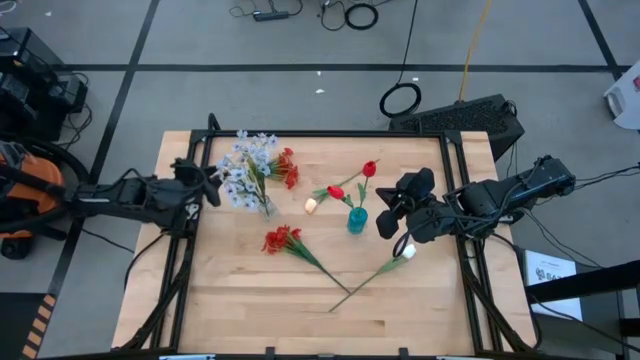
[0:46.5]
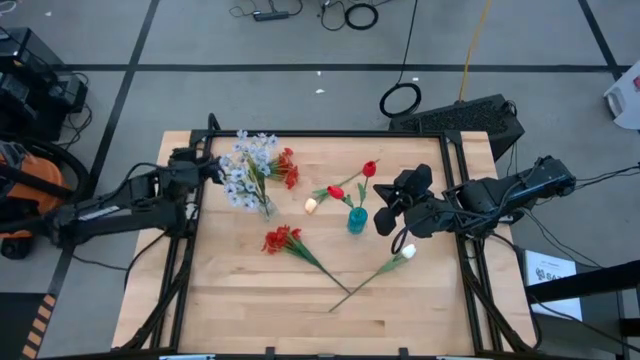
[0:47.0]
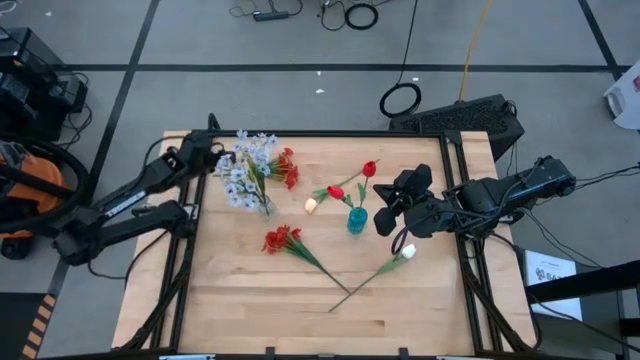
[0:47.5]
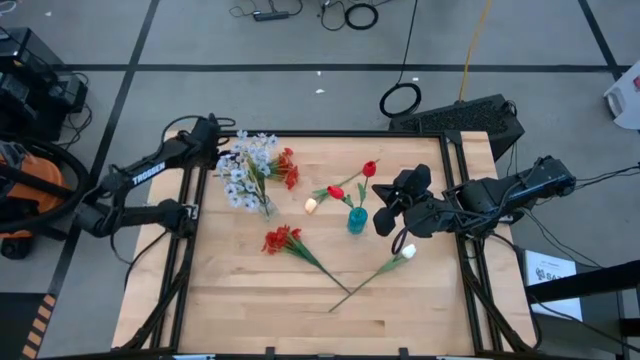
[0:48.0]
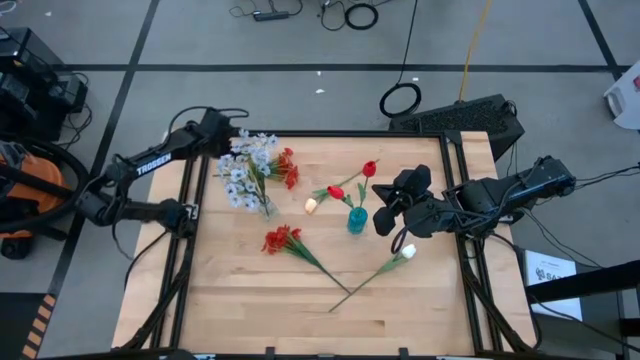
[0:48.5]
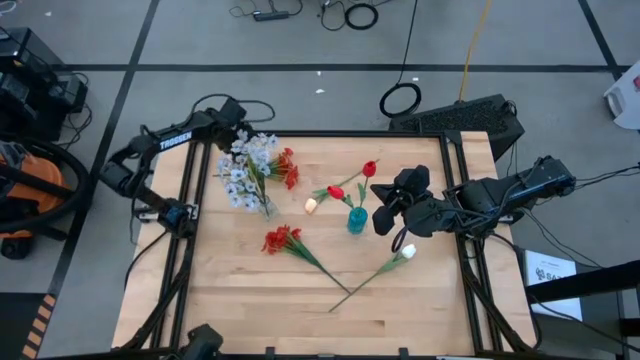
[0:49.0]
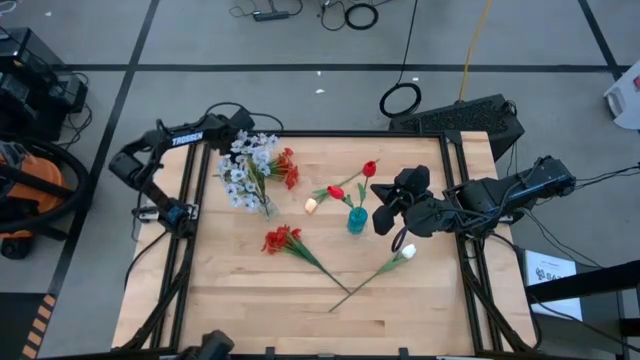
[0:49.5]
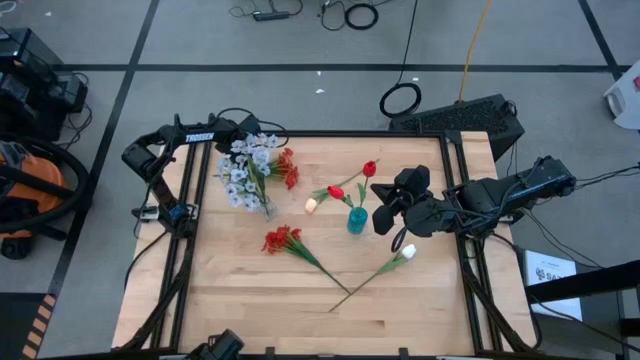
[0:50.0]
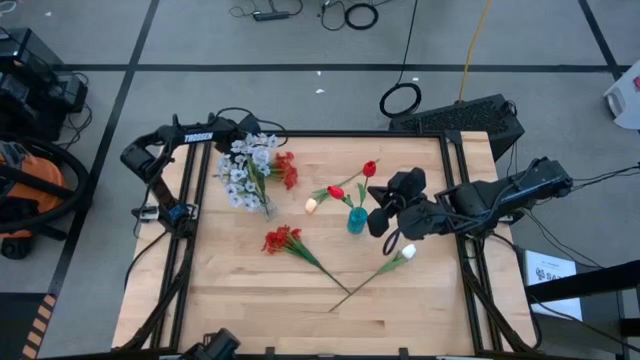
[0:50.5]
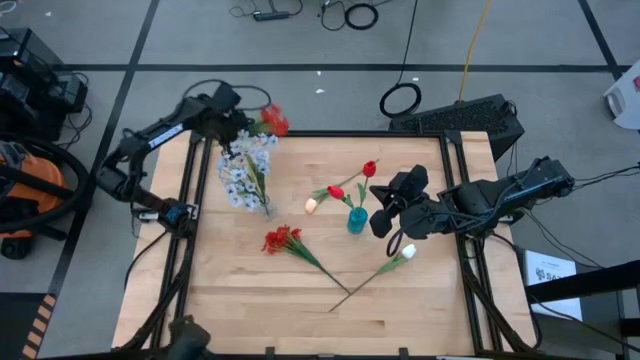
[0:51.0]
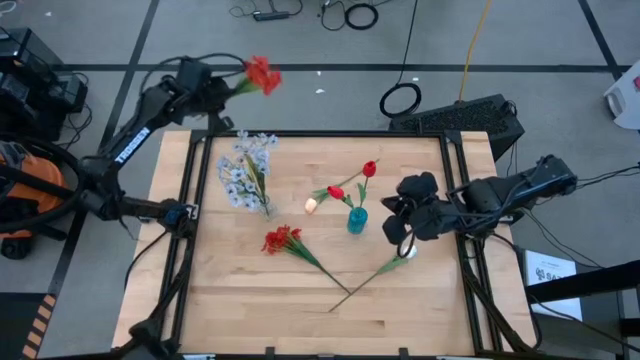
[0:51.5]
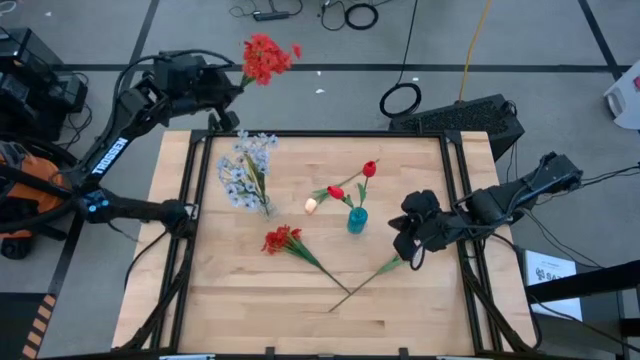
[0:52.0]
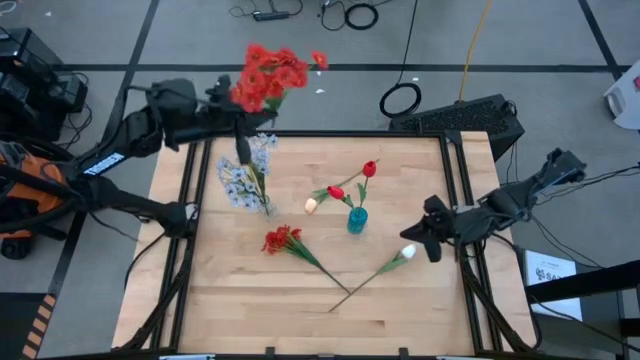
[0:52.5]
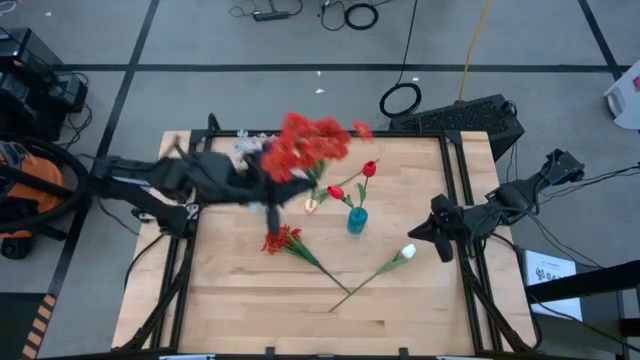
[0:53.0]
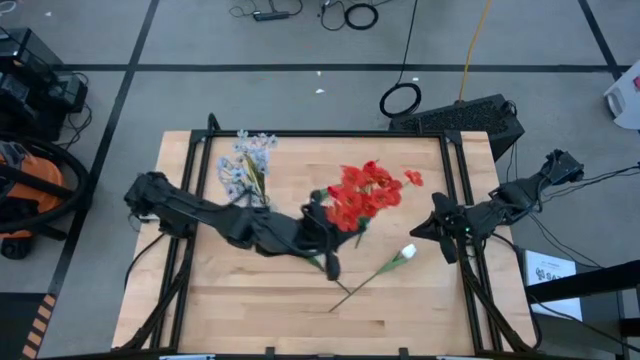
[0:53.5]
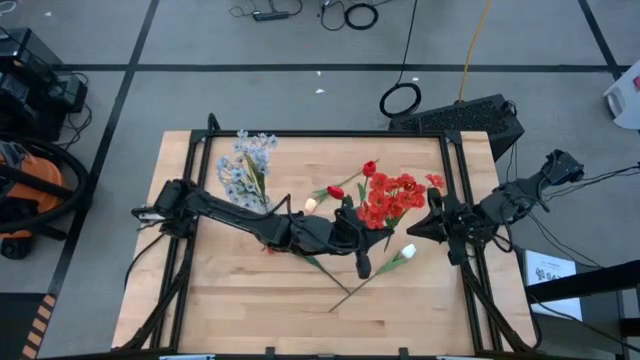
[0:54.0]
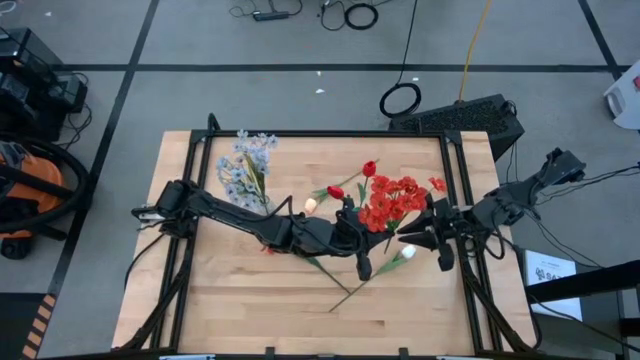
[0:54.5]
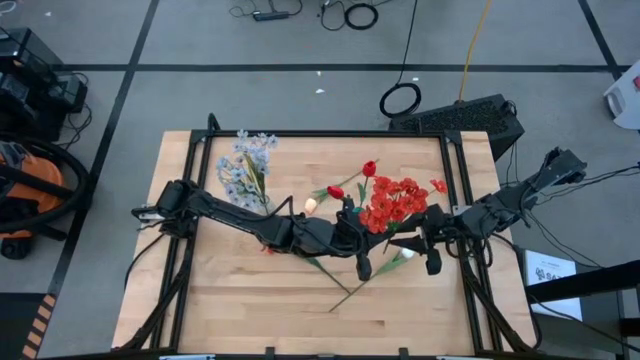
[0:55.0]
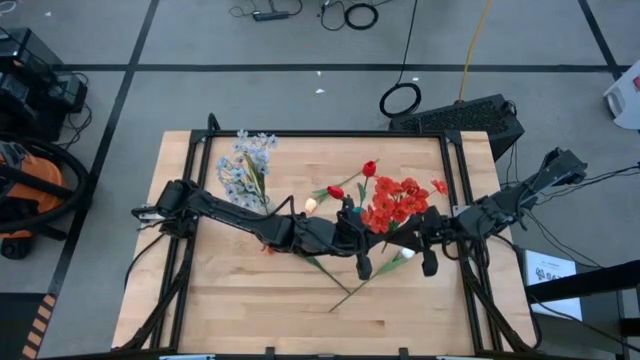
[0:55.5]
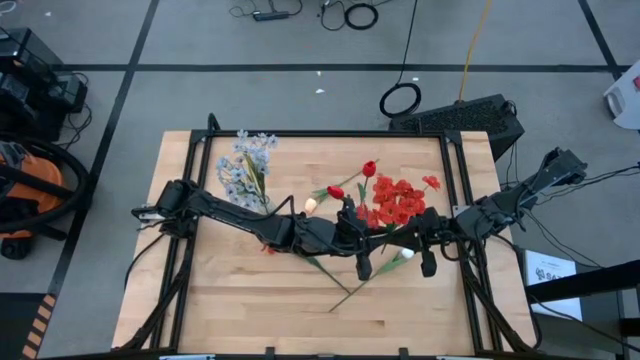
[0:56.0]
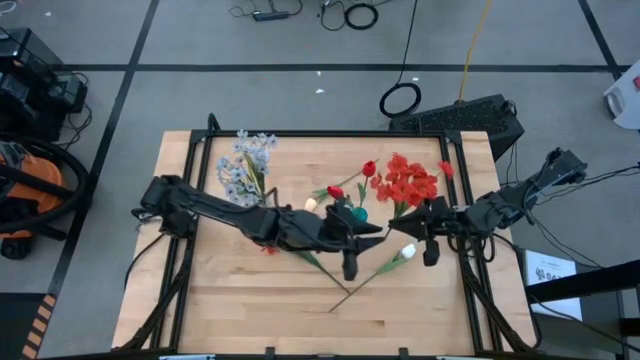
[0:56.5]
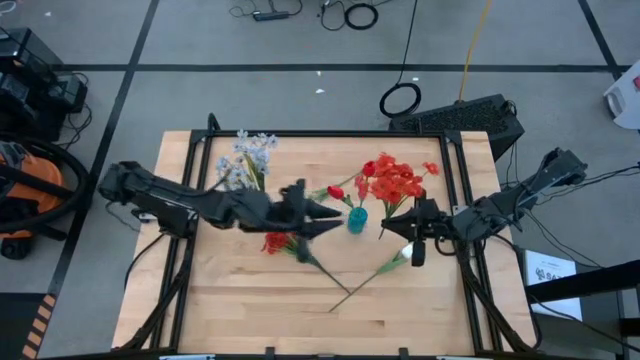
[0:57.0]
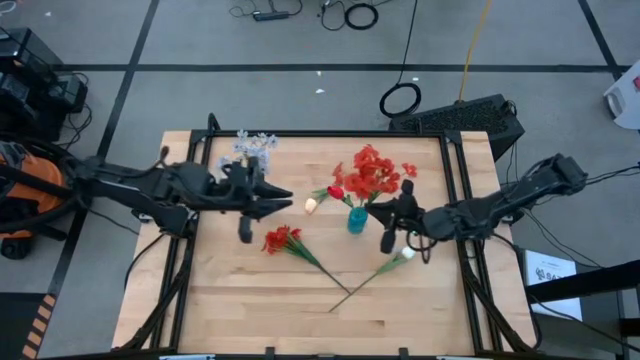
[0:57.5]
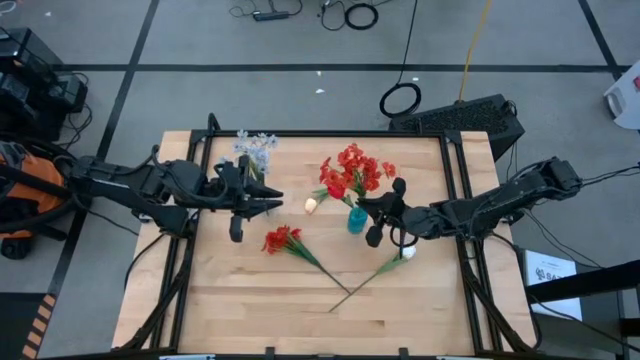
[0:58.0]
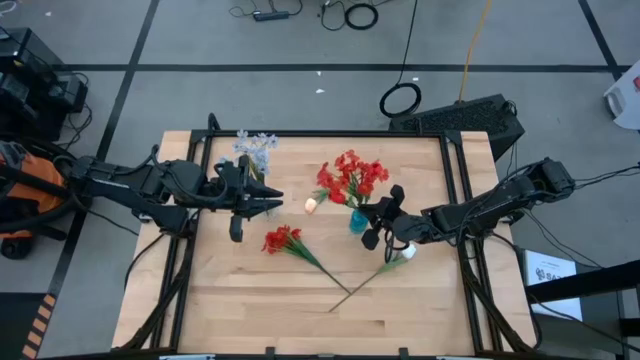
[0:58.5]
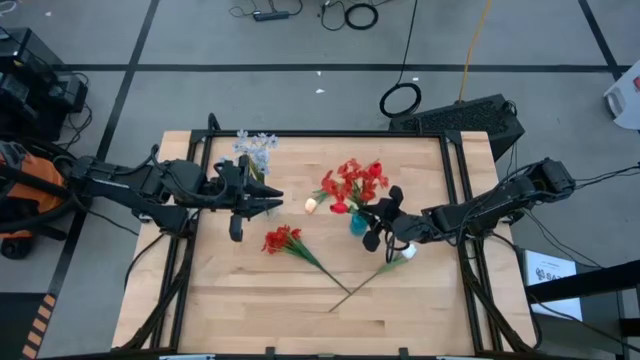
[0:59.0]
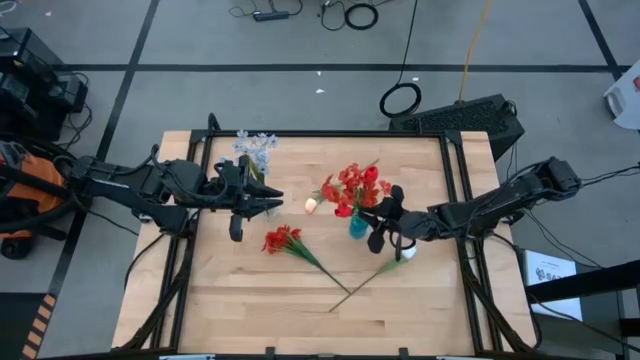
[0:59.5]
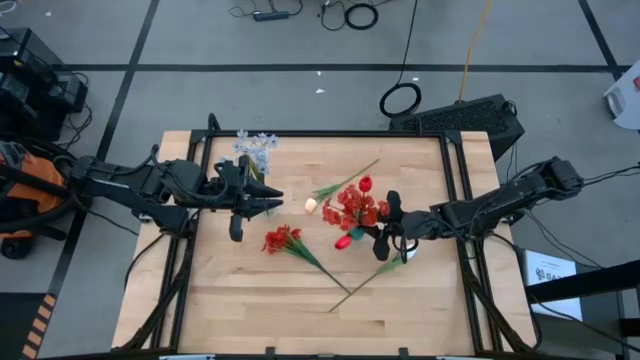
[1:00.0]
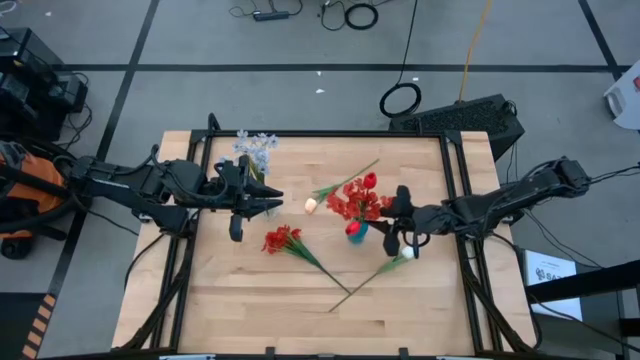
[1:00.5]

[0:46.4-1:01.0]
Task: Sort flowers into vase by color
Put the top red flowers into the blue vase

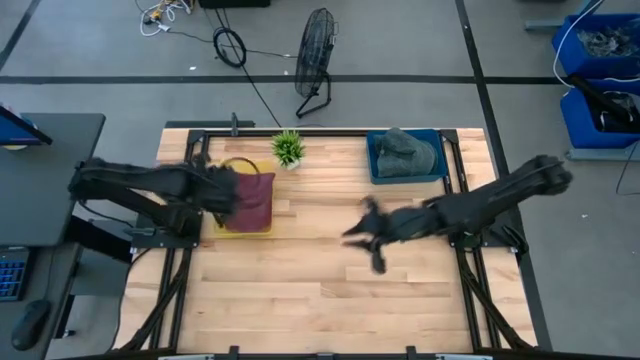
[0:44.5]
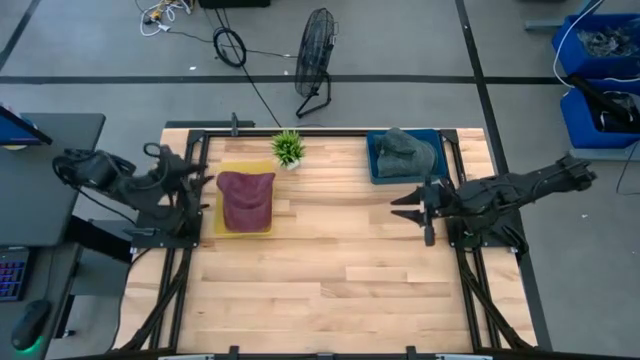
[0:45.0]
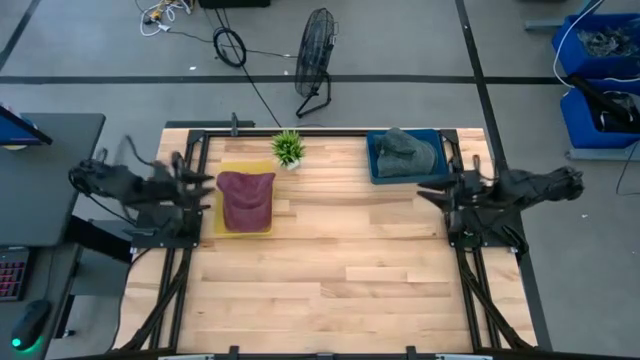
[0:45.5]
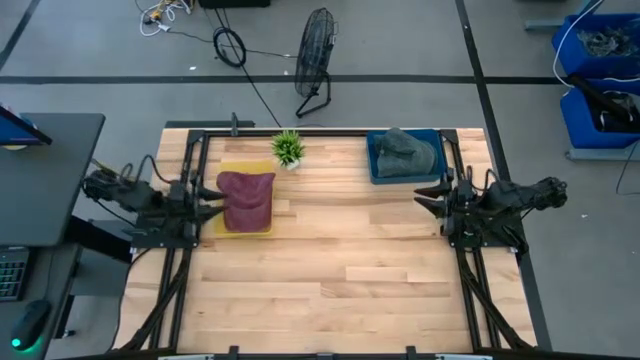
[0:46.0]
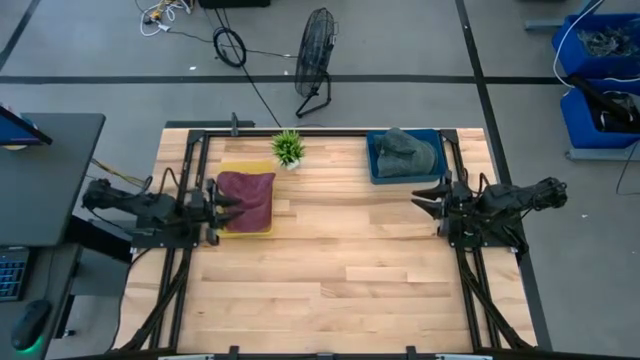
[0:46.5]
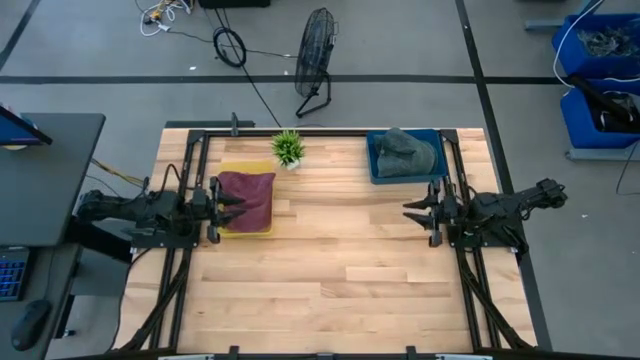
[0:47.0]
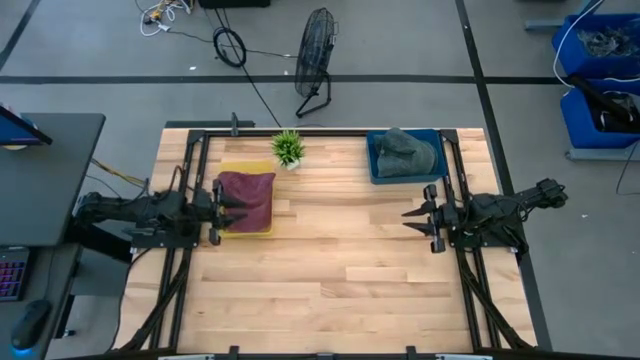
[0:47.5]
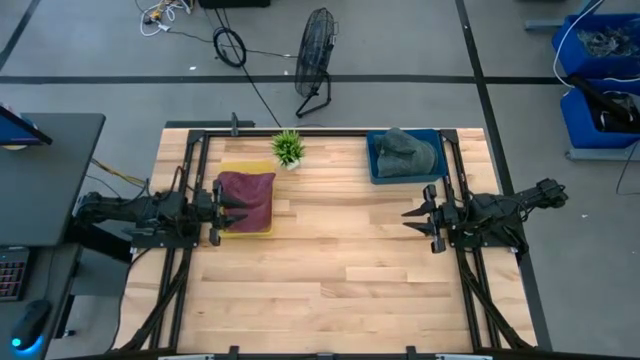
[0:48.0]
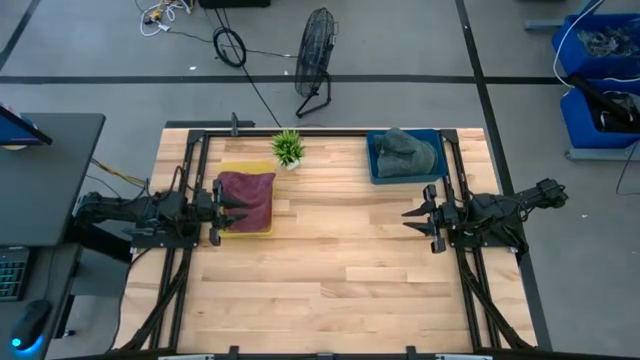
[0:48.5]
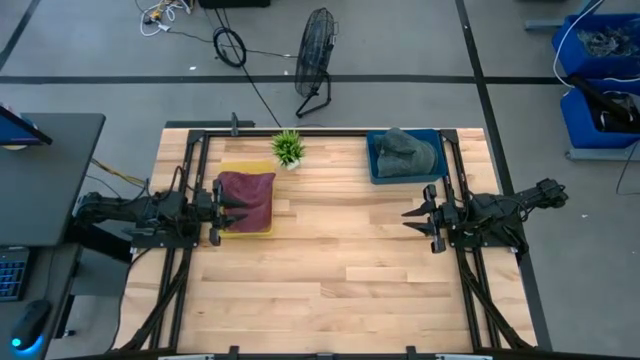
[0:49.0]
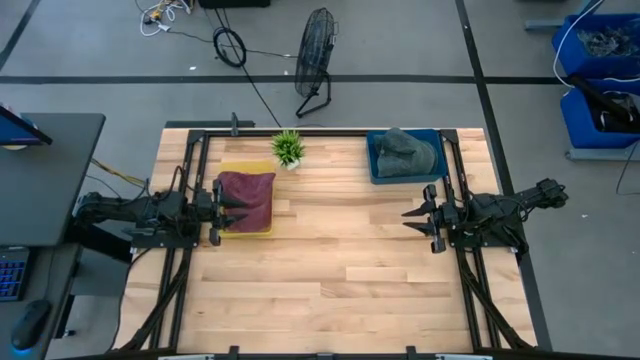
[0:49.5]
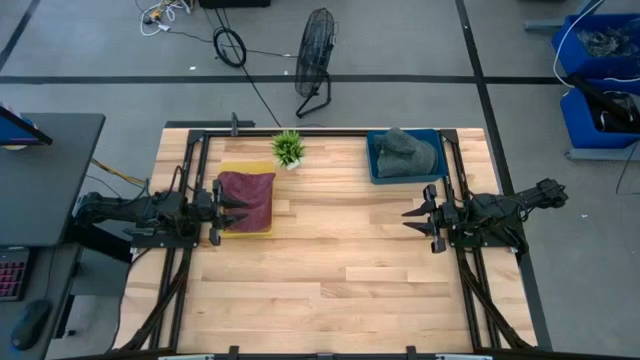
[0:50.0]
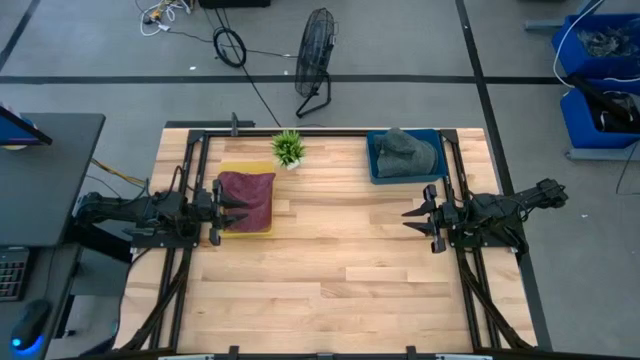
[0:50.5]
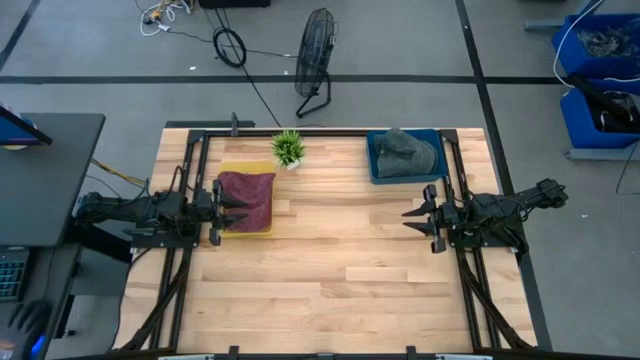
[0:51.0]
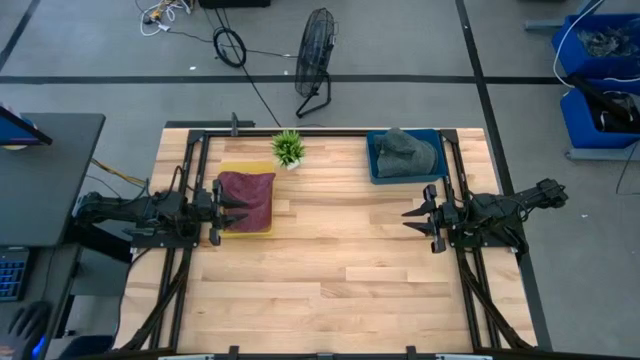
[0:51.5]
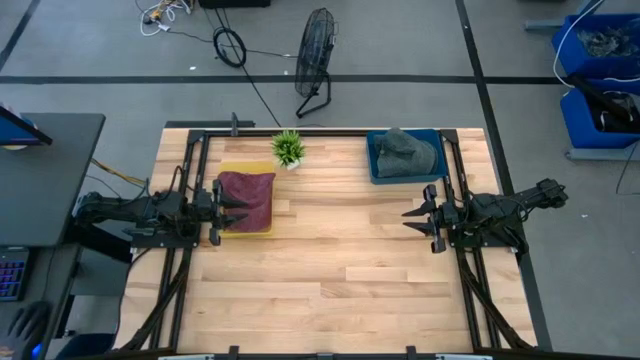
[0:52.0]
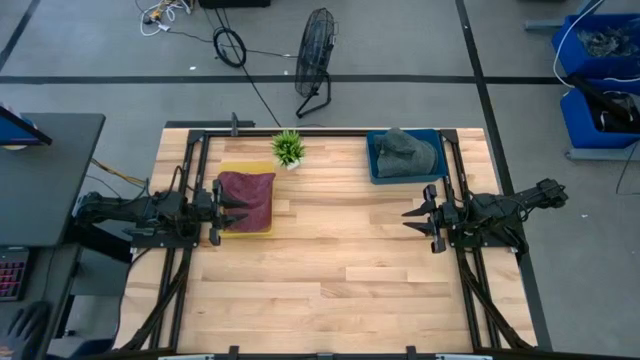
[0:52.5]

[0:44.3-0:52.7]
Task: Pick & Place hat
Return to Home Position
